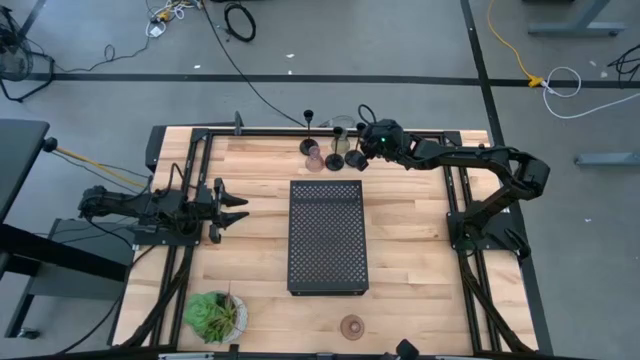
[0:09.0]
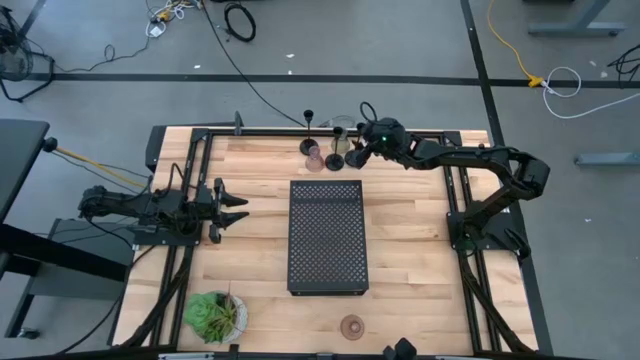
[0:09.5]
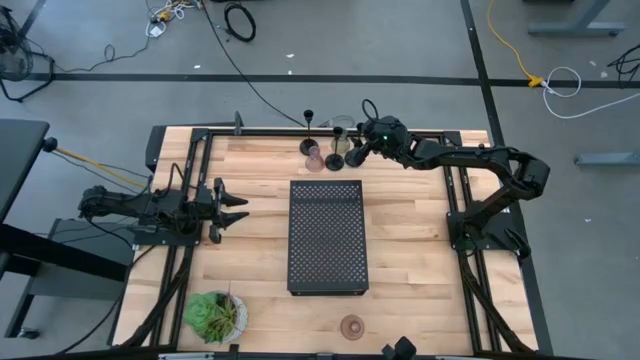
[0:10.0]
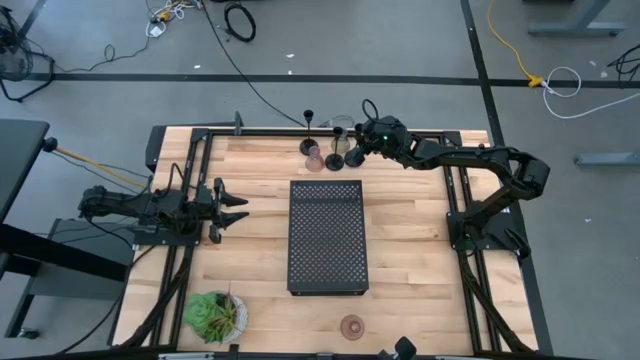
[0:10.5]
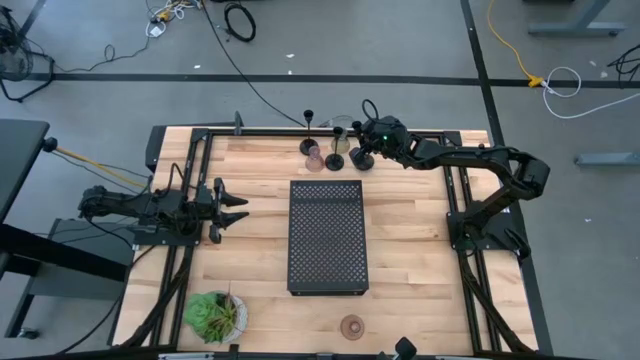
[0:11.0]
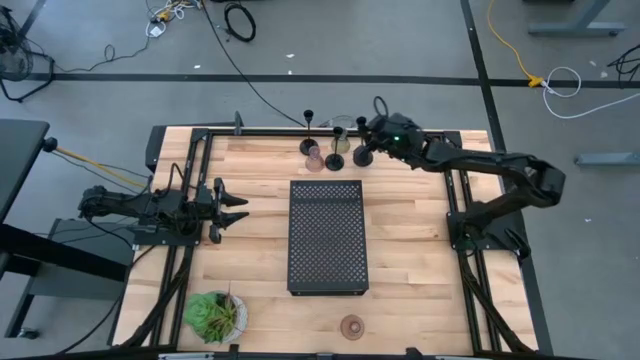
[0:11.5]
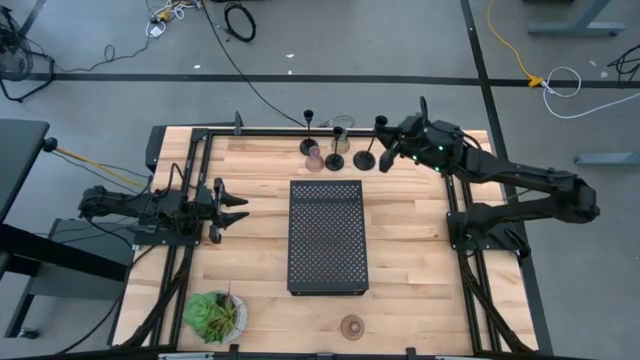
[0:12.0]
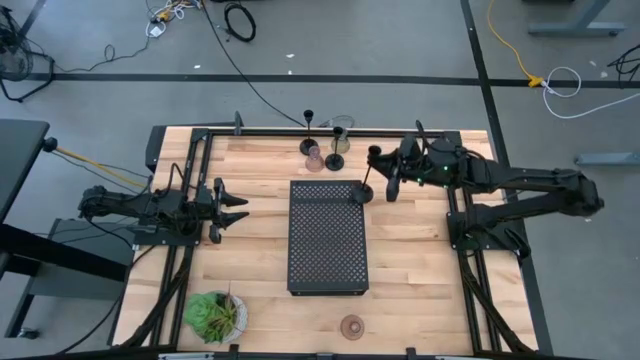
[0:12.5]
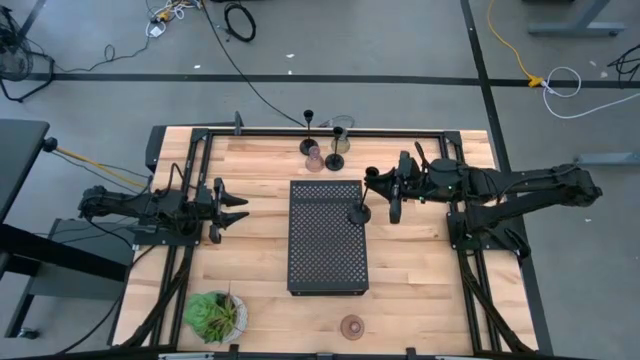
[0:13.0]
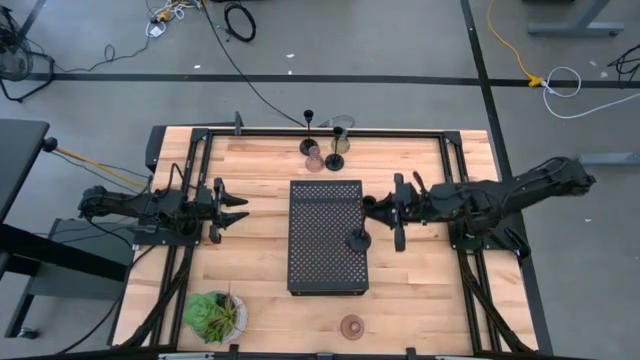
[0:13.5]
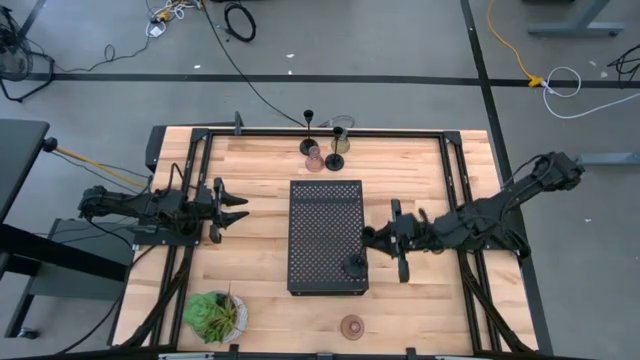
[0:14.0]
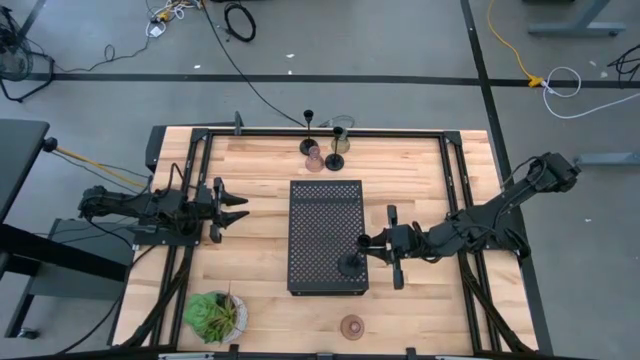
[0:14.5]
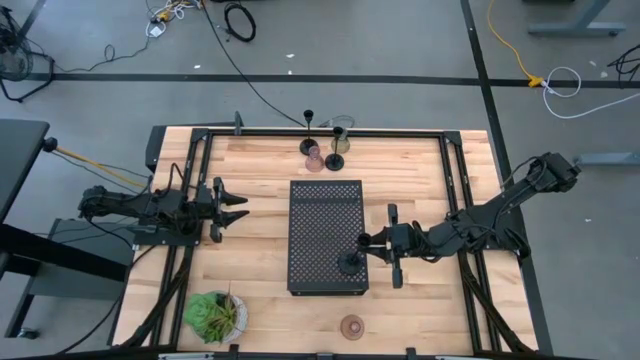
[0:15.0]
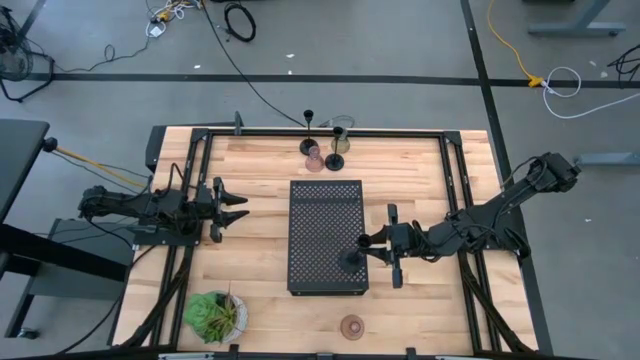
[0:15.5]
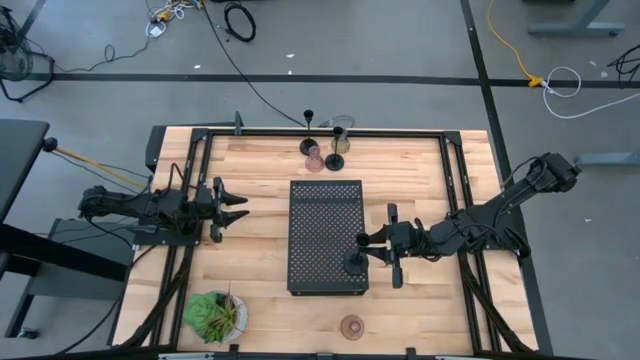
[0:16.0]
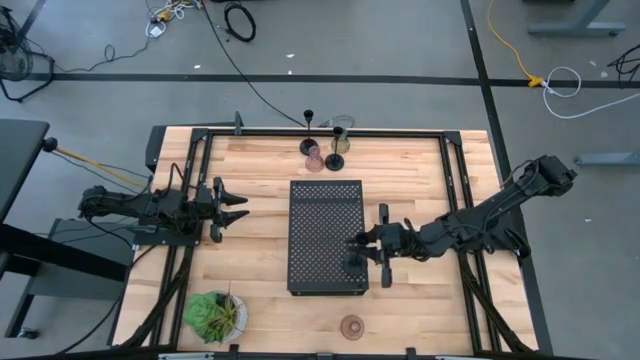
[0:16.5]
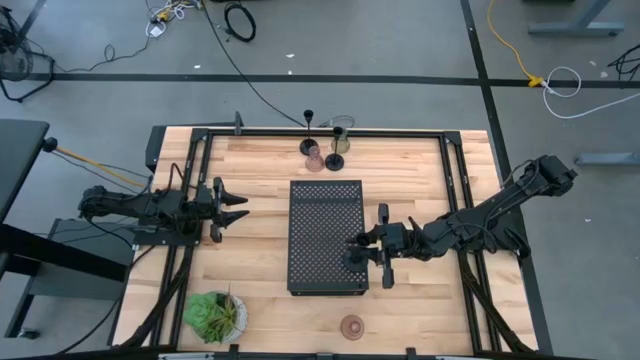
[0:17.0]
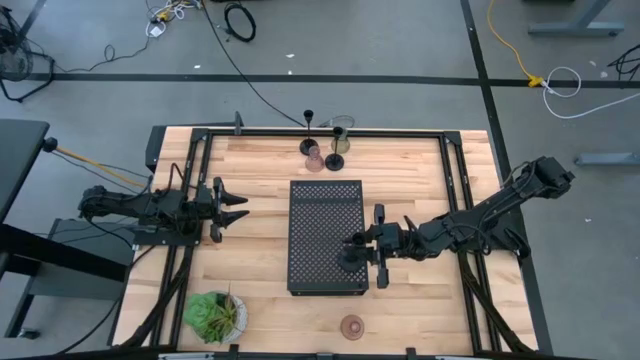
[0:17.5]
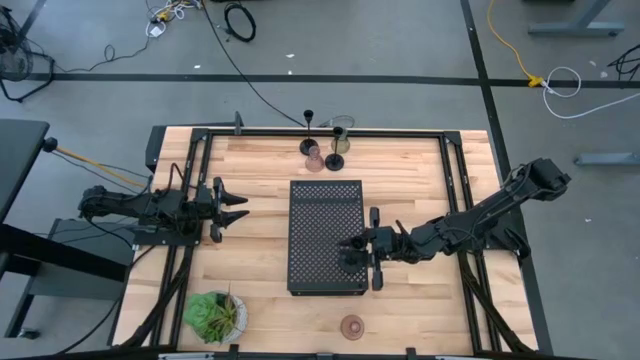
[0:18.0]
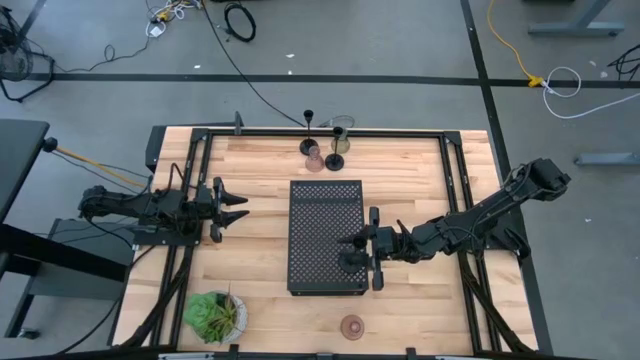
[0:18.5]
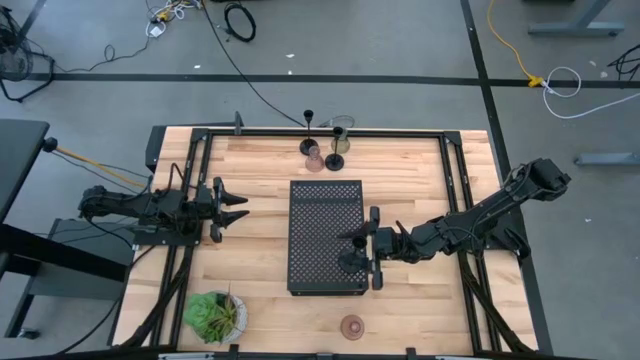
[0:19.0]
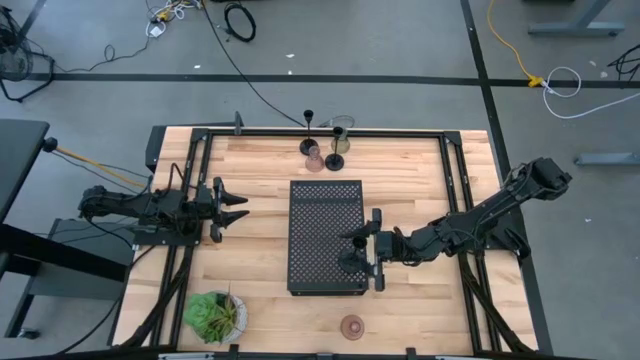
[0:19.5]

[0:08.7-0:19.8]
Task: Pick & Place candle stick holders
Put the right black candle holder on the shelf

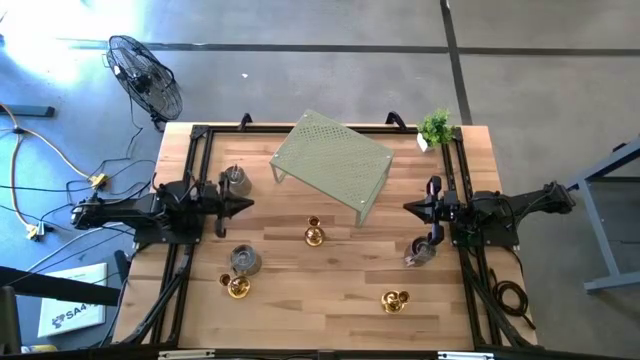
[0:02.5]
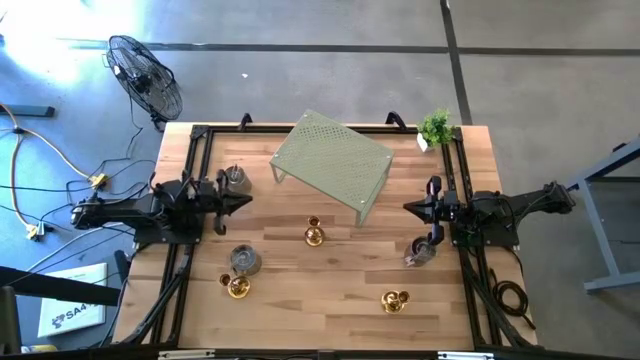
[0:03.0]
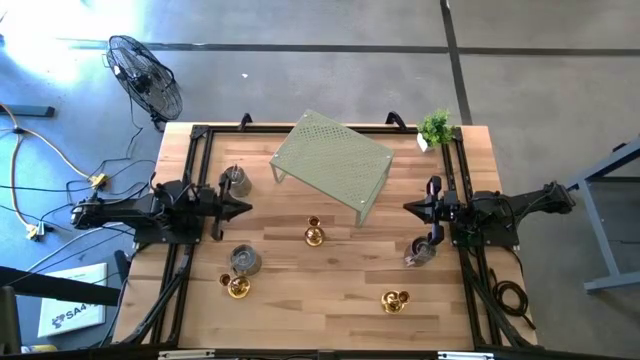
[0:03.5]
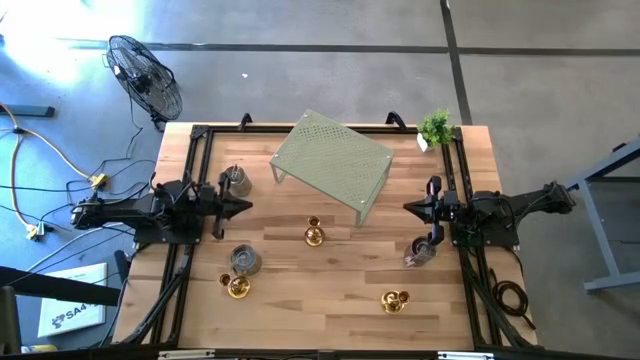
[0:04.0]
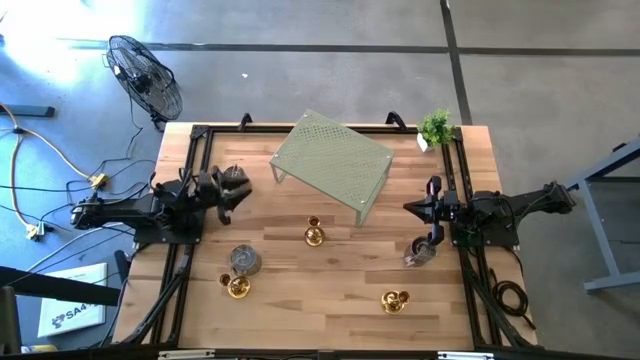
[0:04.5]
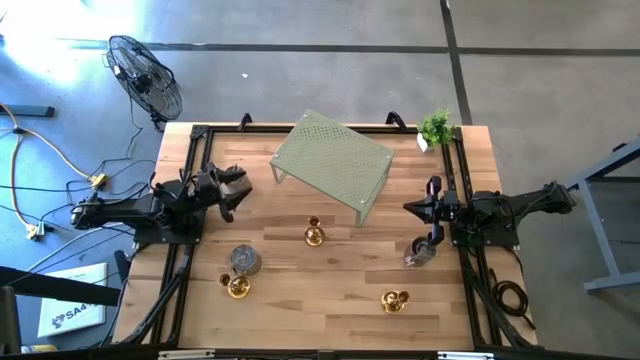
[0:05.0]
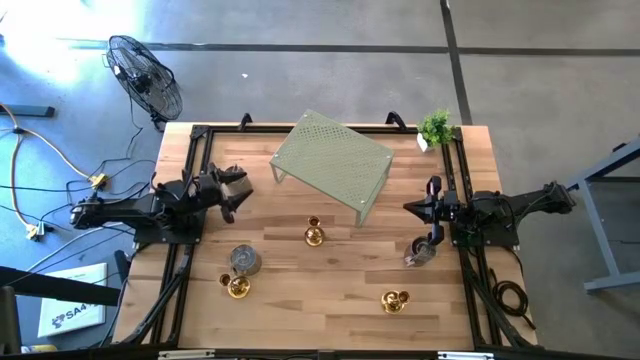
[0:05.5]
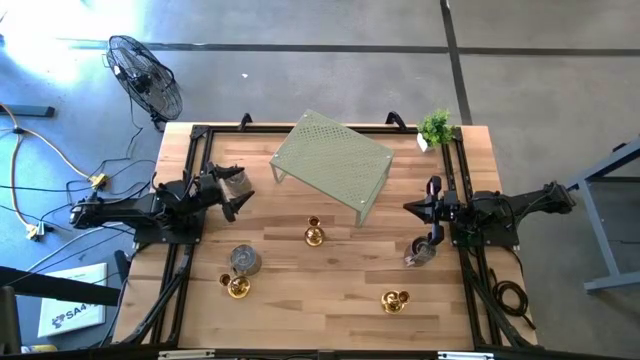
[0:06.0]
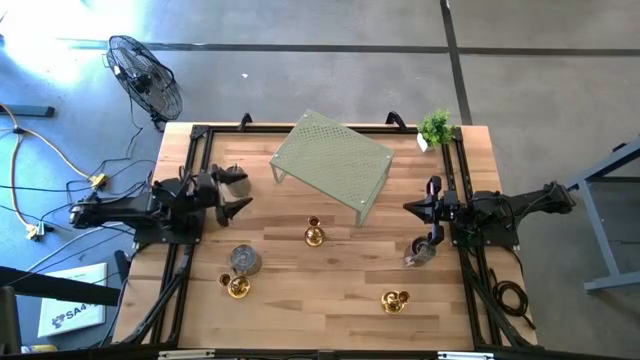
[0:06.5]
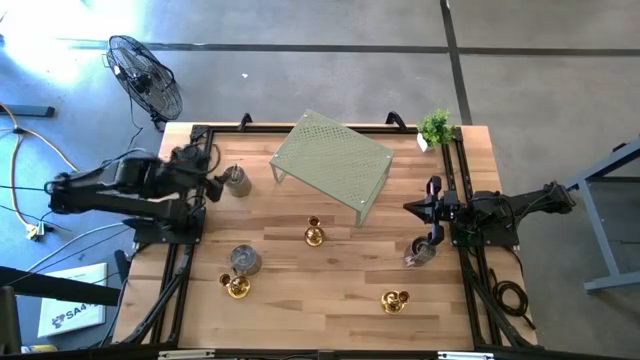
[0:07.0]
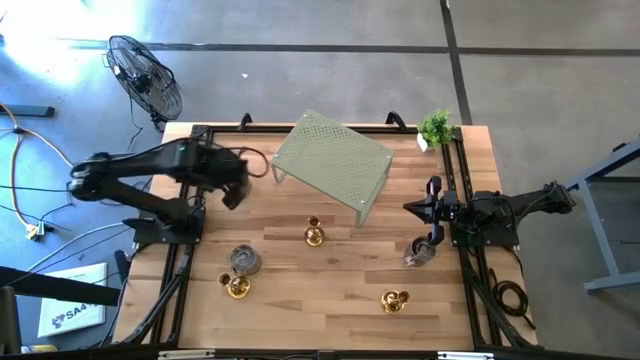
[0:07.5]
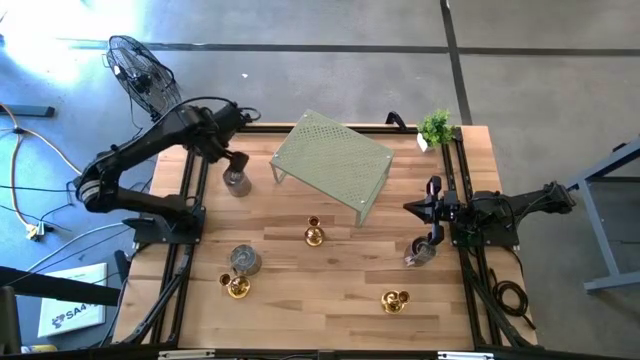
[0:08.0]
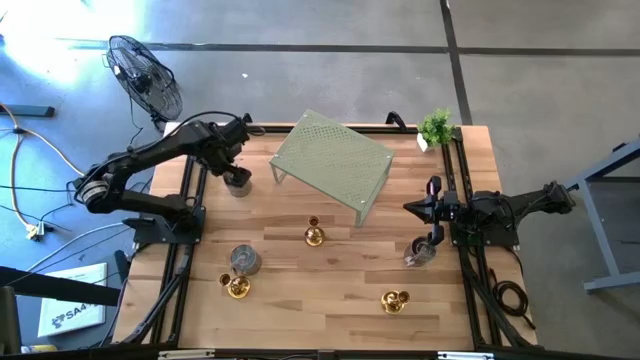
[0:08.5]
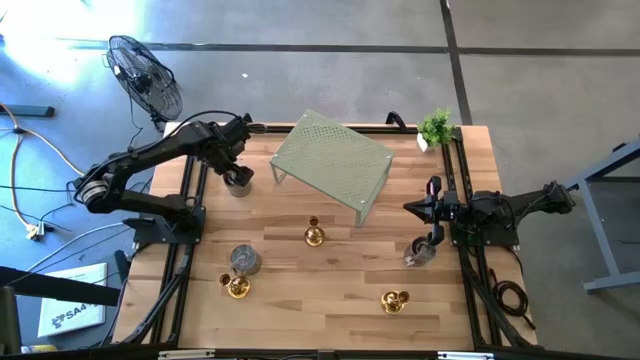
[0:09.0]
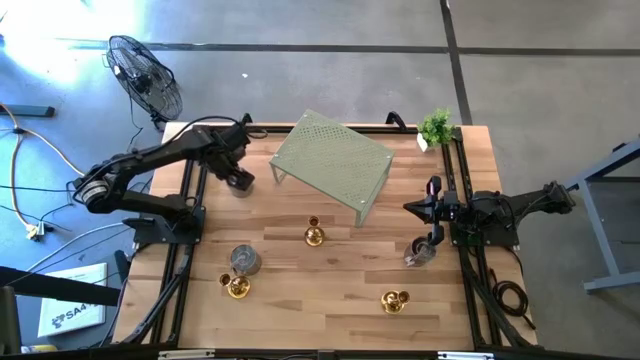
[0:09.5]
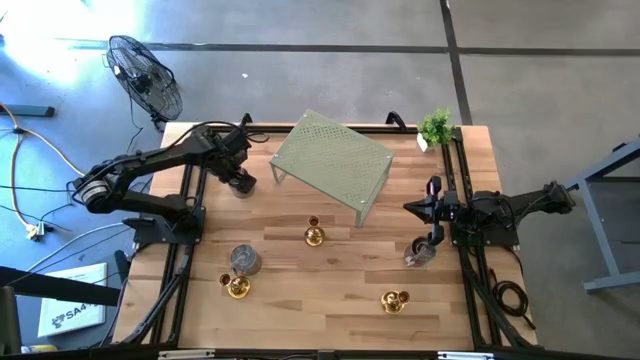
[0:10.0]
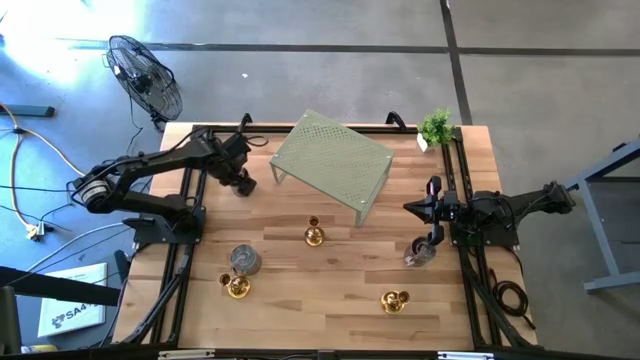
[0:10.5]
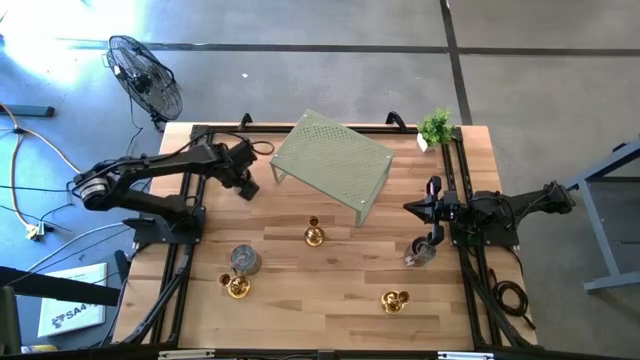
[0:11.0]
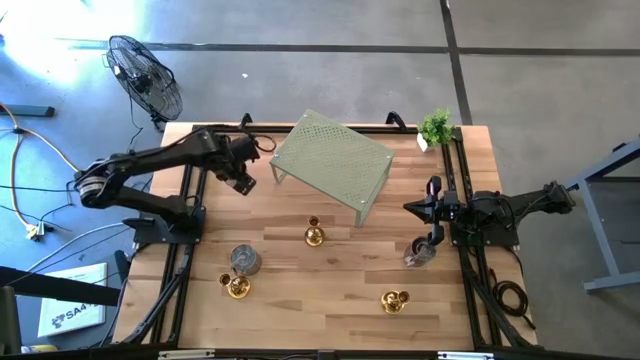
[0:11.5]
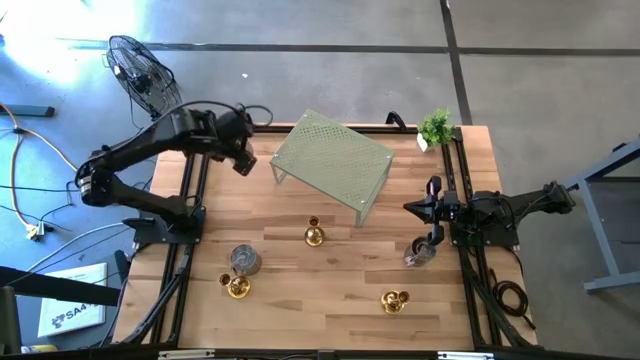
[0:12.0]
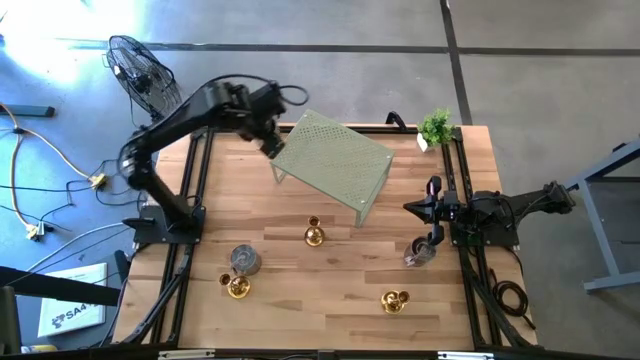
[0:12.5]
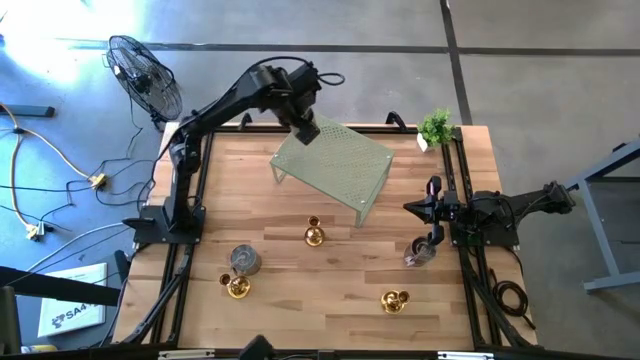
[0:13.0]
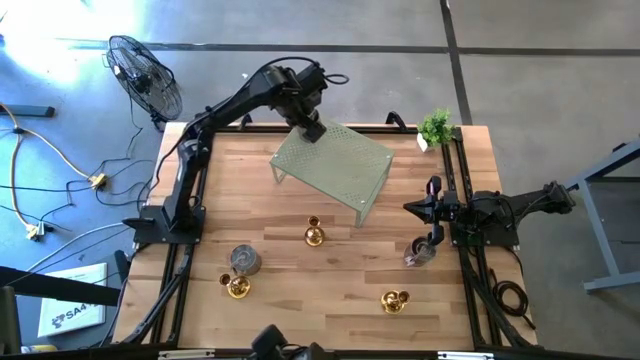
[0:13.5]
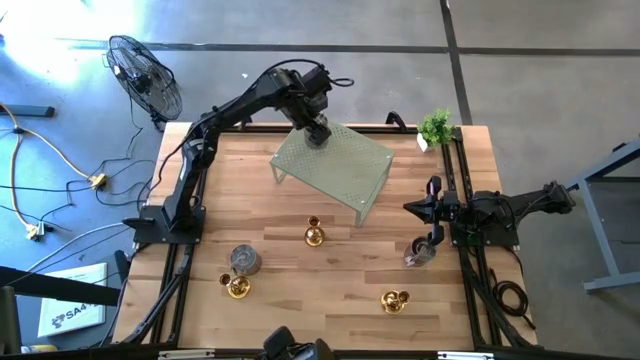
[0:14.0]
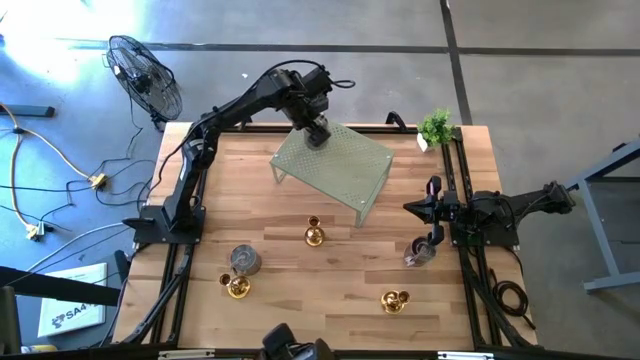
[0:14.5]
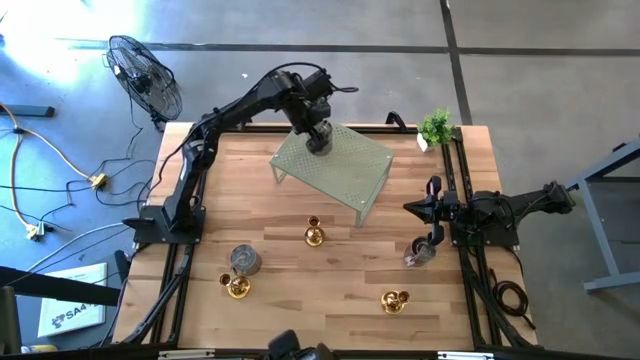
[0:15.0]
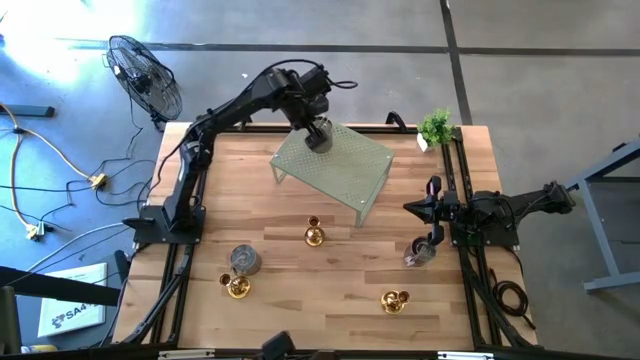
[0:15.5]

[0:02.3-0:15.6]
Task: Pick & Place candle stick holders
Put the top green scented candle on the shelf
